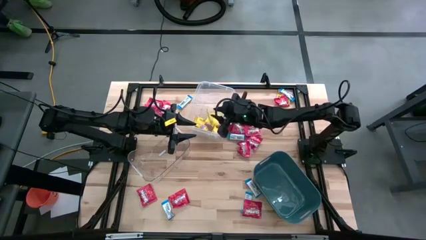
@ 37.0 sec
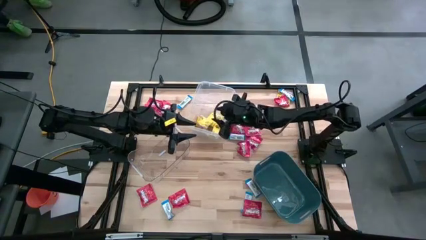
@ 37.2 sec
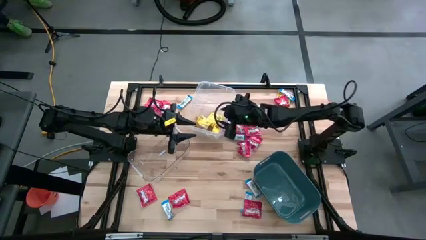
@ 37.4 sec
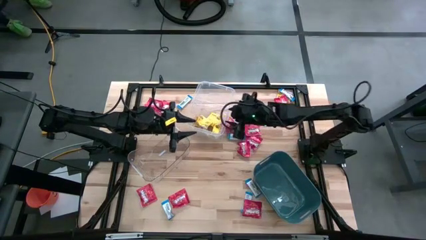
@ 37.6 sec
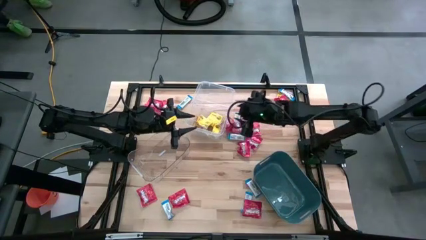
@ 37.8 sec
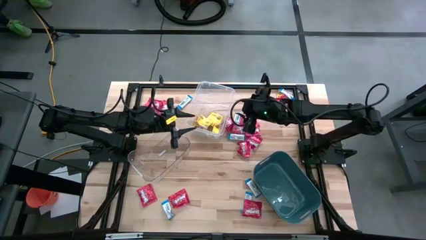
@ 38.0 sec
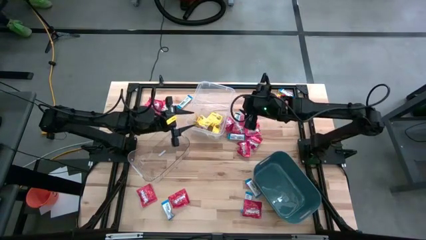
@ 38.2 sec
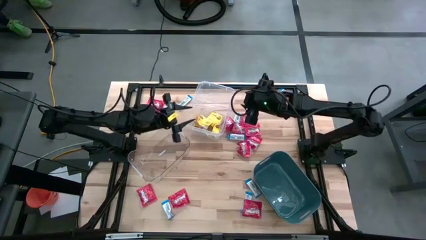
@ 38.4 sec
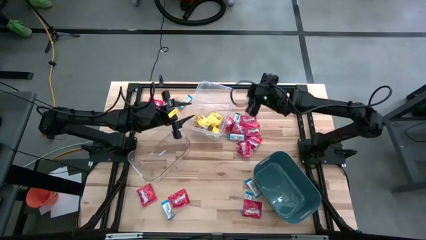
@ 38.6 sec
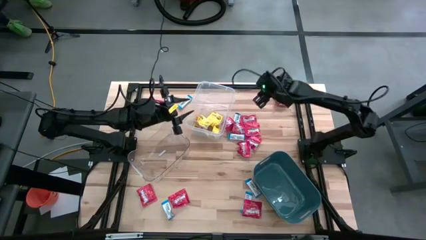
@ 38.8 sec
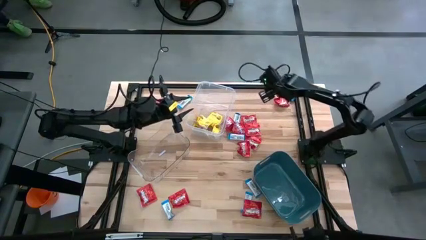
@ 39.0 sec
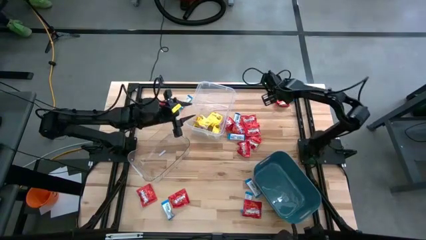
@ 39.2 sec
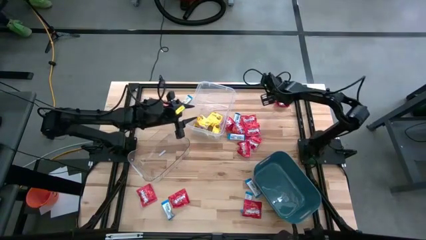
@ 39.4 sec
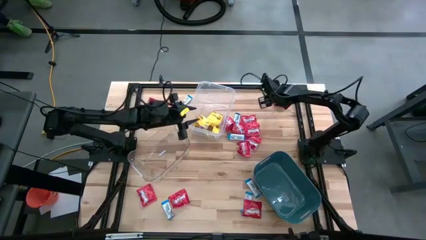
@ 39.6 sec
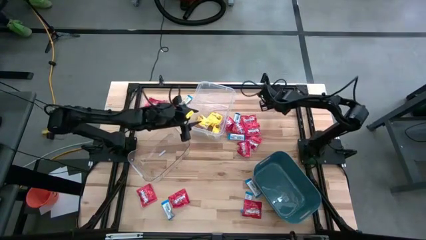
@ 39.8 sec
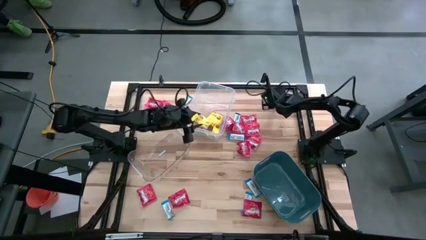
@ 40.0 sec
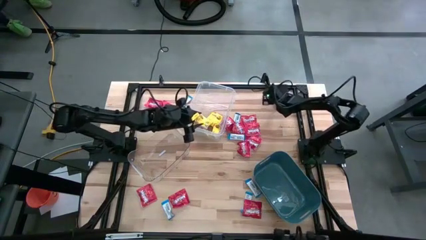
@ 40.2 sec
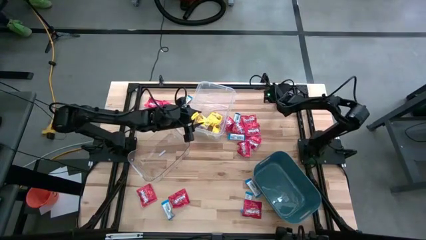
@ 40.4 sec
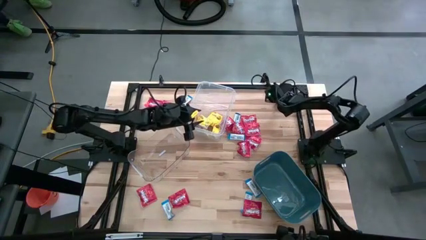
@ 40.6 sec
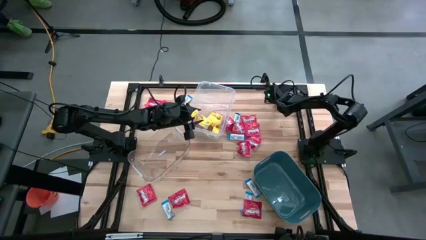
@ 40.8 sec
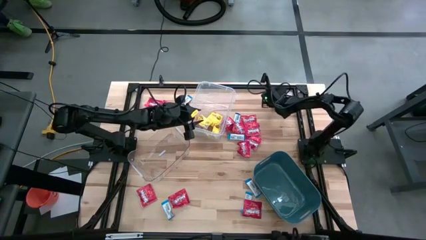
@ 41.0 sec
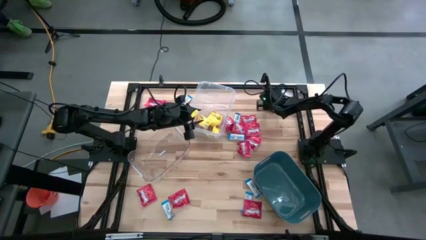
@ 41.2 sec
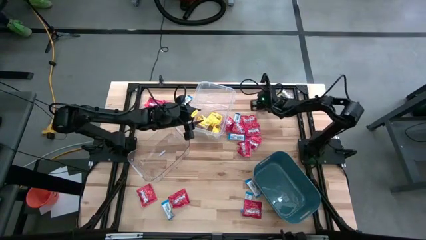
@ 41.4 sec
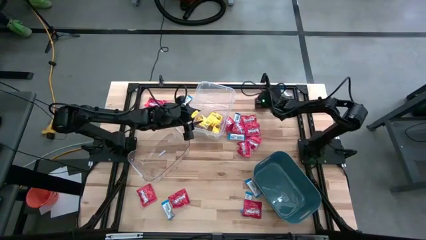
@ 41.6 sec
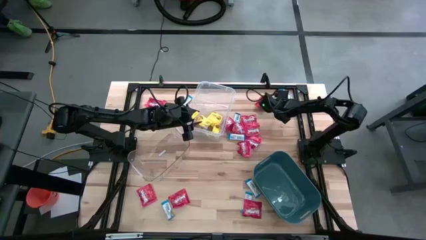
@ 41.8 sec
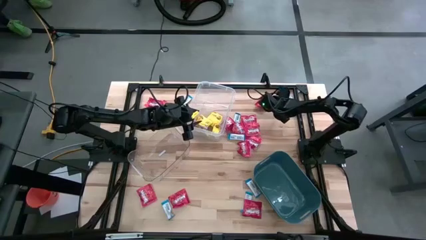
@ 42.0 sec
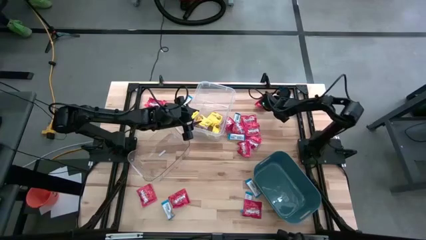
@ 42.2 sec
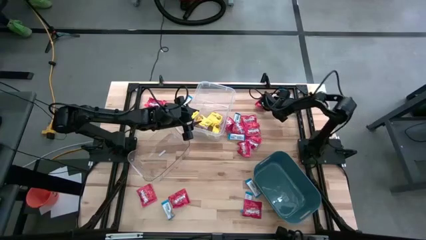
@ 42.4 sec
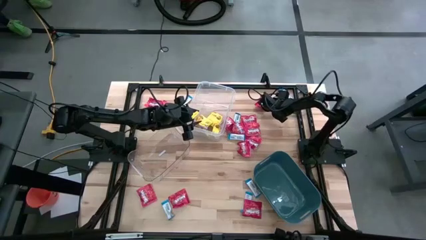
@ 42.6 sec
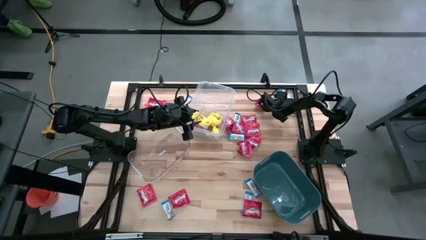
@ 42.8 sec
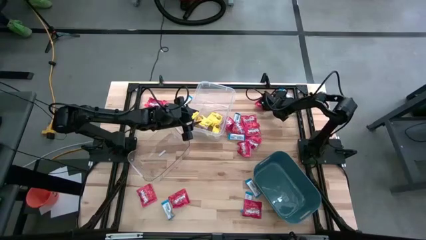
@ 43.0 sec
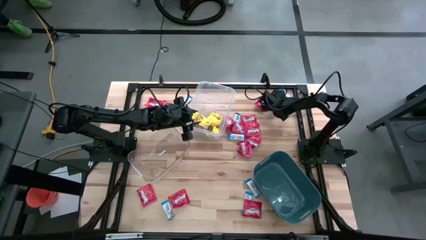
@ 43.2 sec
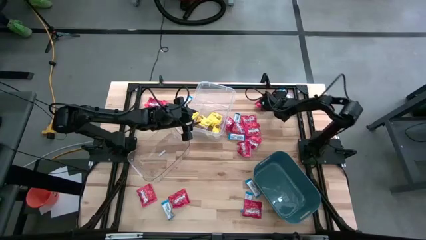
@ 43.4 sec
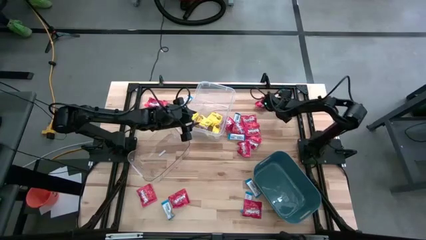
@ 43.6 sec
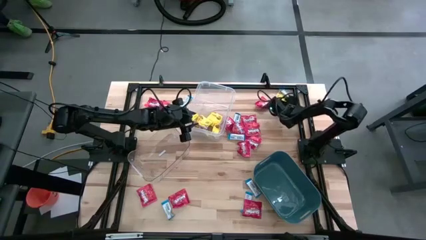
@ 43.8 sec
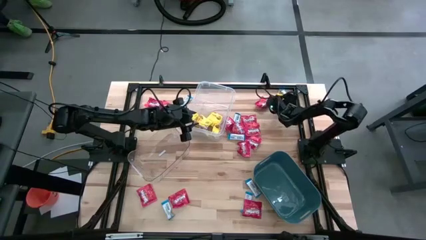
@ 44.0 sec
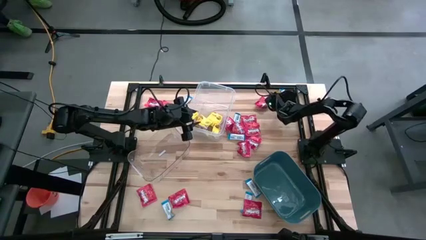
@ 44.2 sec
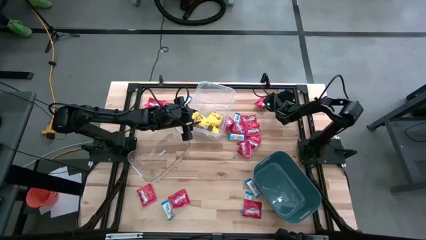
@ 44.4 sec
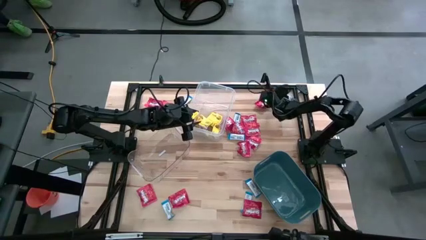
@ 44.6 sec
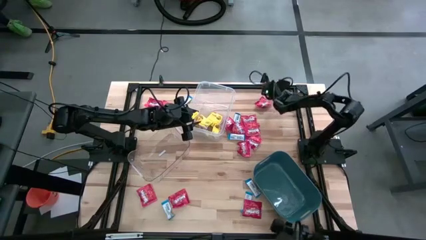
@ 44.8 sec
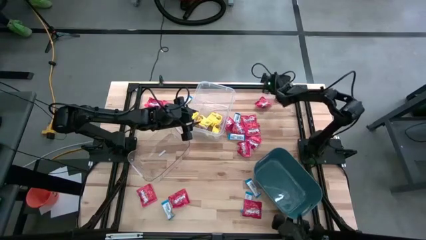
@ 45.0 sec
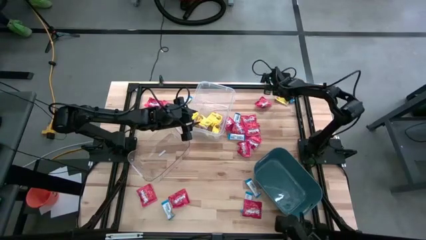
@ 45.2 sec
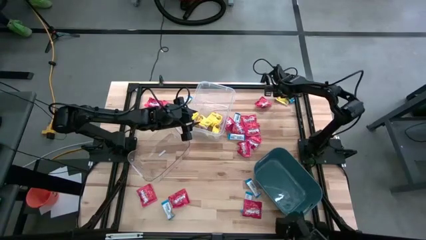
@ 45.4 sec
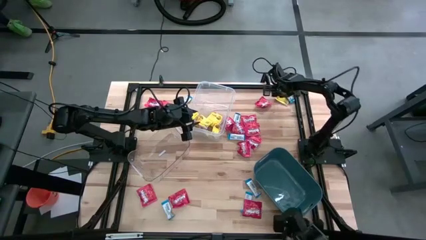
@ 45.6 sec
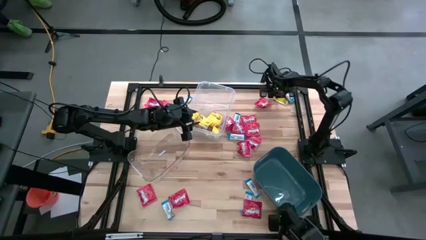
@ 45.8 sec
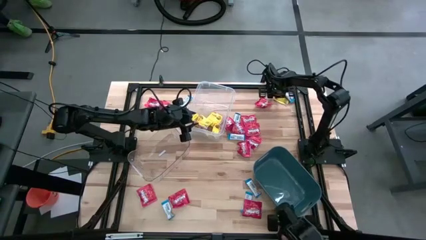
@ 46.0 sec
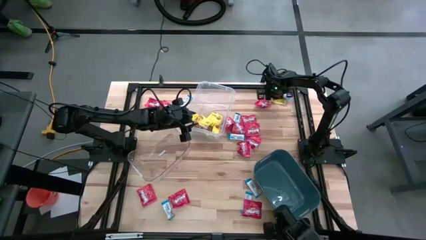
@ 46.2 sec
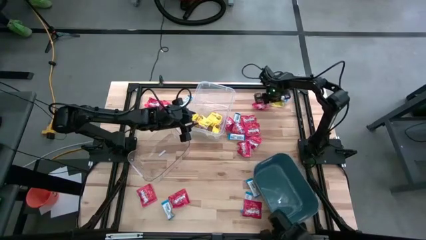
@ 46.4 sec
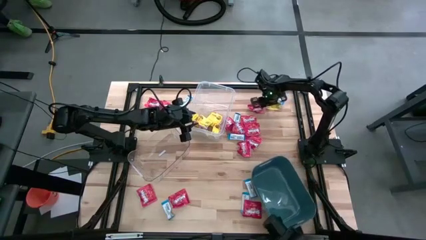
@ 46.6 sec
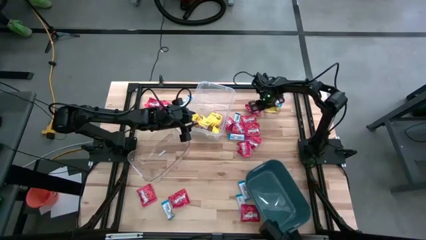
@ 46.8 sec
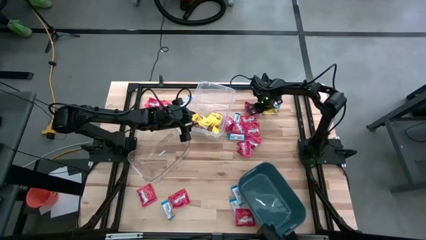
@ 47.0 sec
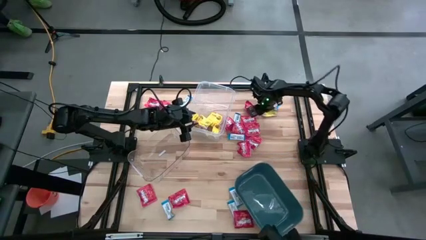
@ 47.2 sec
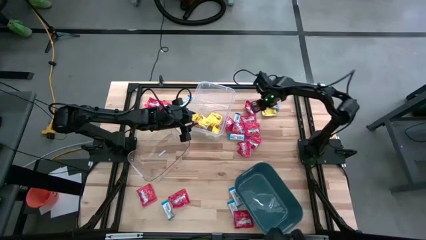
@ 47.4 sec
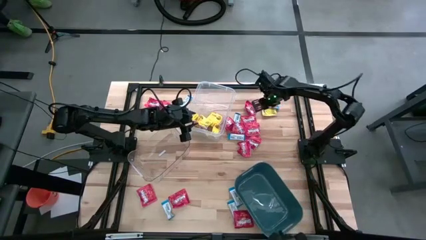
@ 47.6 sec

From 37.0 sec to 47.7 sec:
Task: Sort candy
Adjust the candy packs

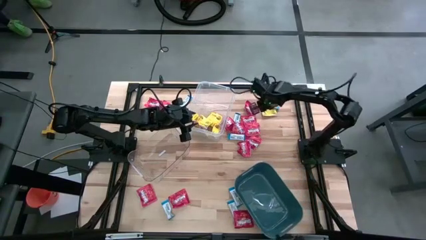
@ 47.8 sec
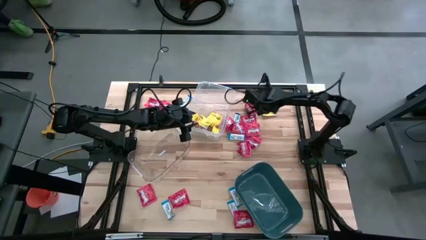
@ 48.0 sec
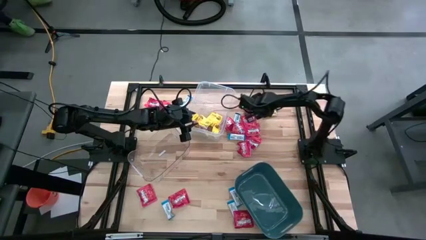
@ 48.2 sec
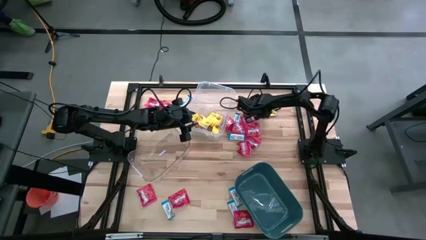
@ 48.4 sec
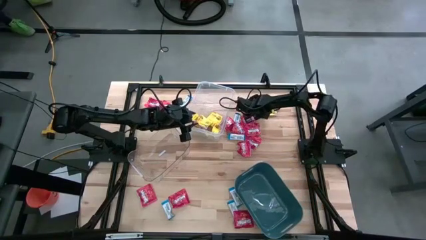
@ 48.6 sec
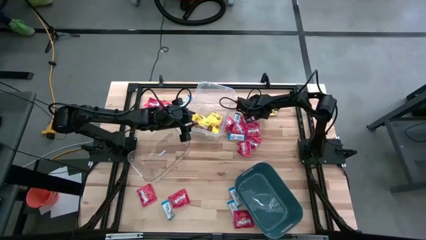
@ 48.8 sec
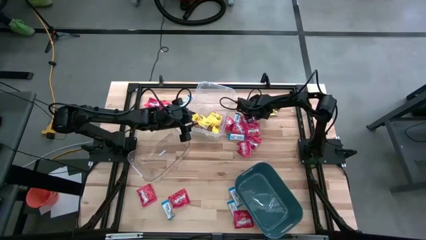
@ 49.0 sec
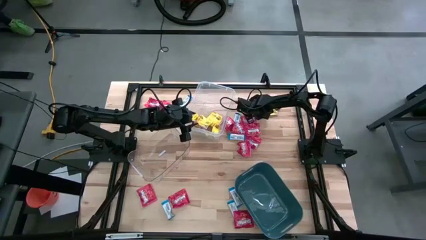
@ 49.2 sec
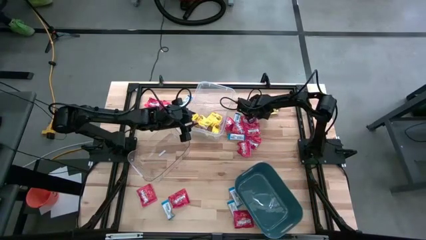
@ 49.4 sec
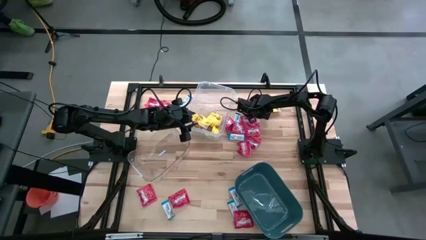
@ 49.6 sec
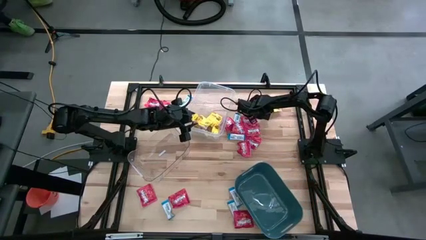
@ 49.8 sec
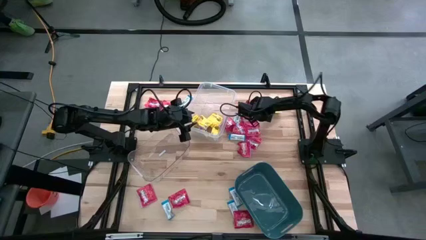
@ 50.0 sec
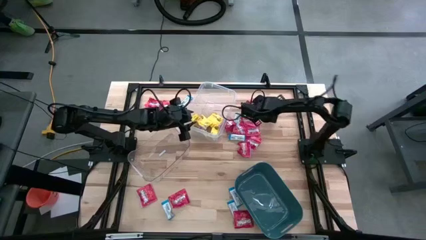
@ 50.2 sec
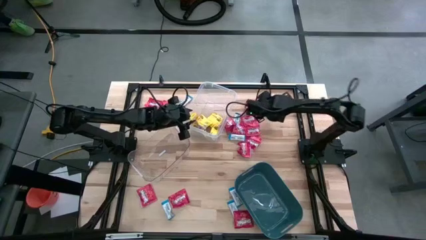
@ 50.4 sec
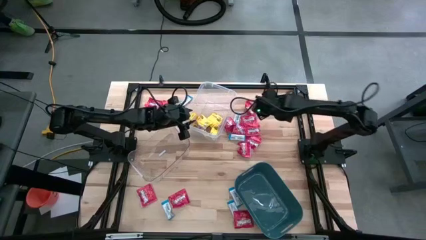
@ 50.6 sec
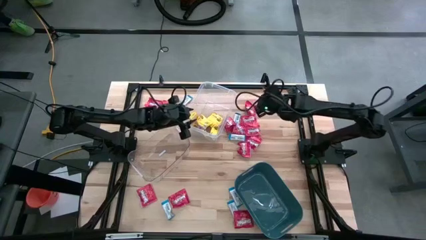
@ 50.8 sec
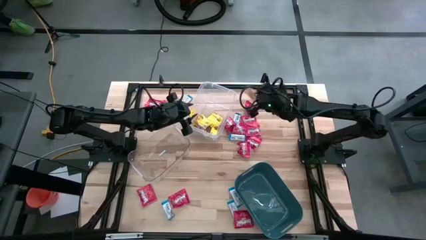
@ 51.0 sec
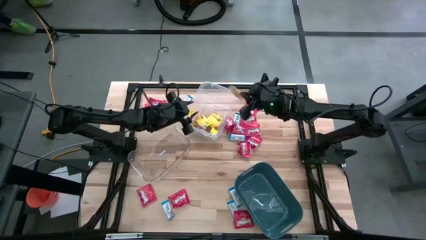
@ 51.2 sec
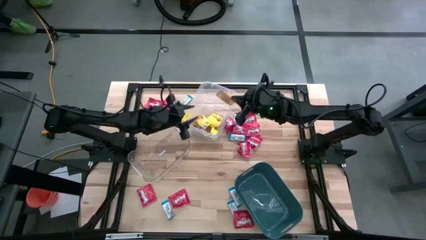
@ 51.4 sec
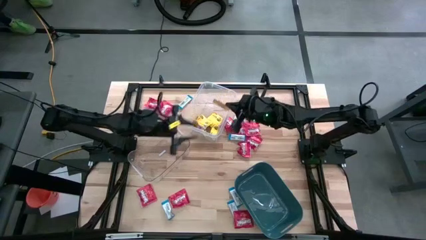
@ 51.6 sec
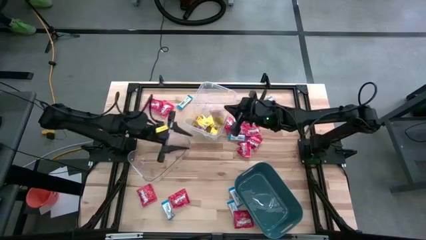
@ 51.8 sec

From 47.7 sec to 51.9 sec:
Put the yellow candy into the transparent container

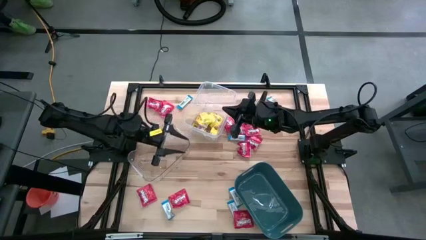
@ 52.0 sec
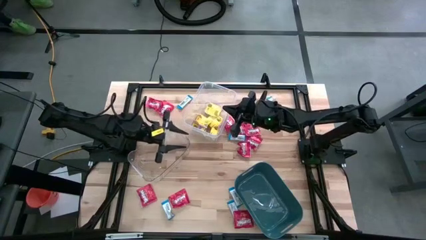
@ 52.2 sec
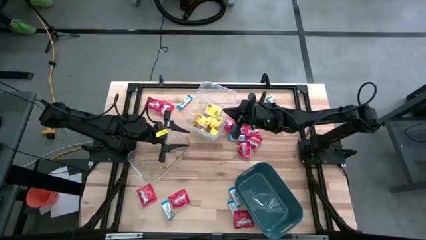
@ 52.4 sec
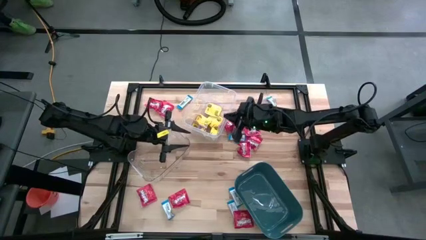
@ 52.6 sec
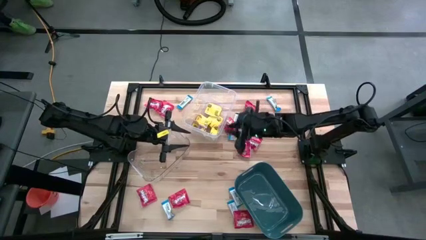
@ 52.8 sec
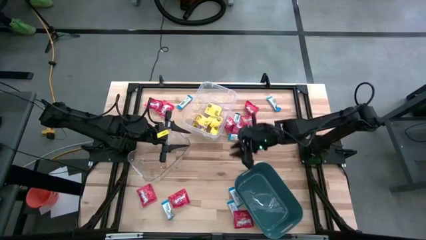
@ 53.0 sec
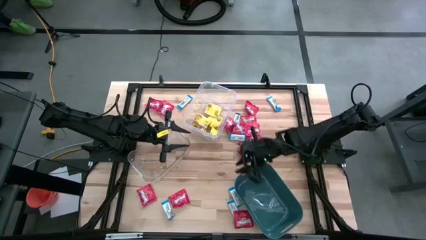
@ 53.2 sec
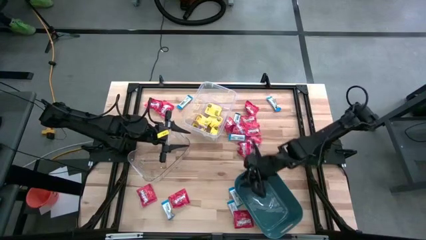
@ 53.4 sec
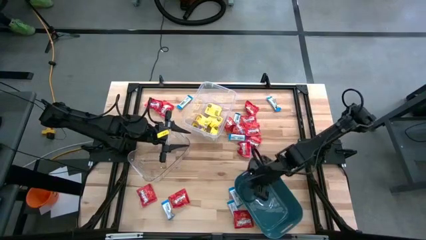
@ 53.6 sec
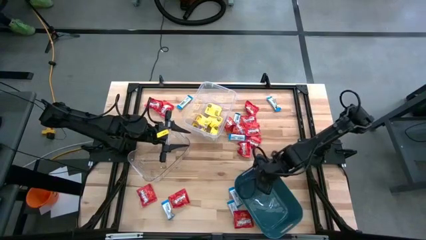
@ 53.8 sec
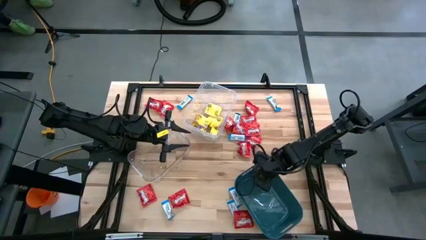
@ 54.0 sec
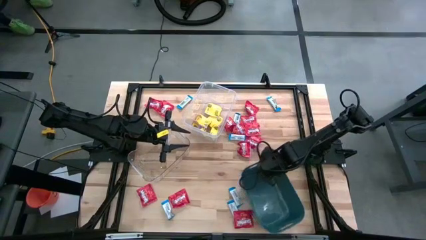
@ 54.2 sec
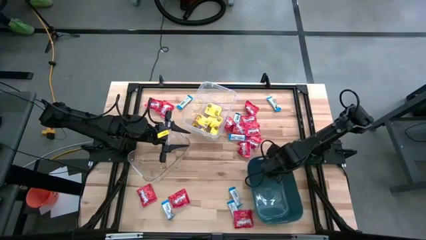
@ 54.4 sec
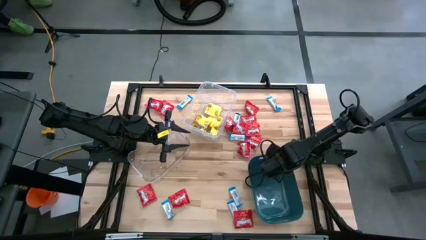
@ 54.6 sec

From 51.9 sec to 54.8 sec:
Adjust the blue bin
